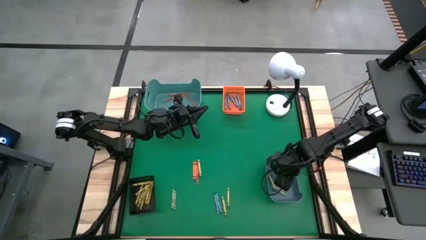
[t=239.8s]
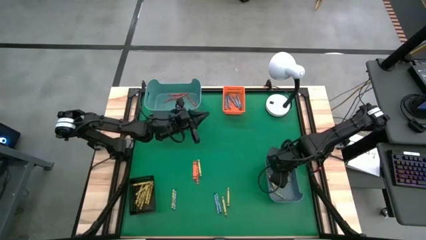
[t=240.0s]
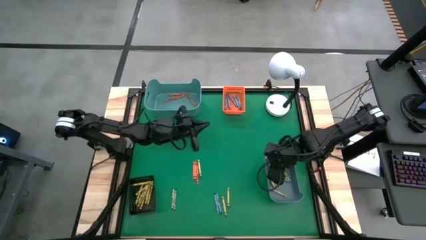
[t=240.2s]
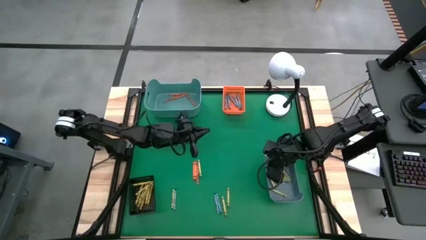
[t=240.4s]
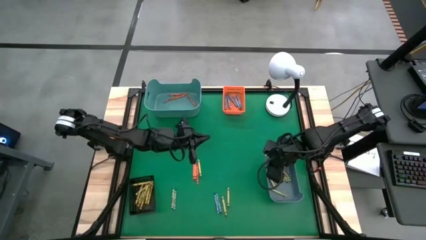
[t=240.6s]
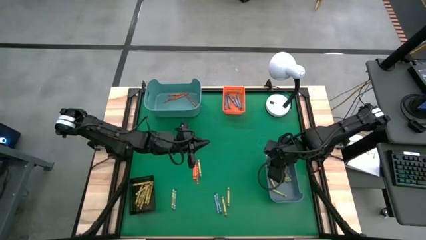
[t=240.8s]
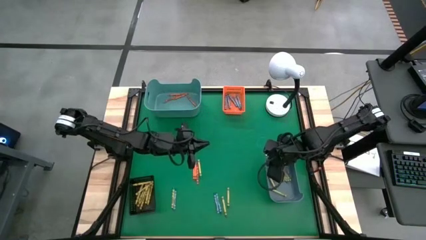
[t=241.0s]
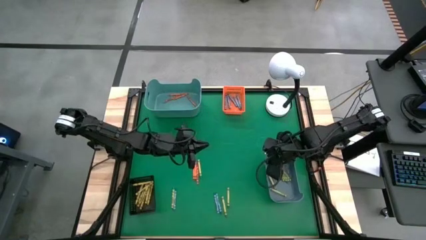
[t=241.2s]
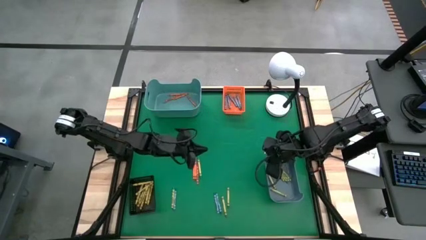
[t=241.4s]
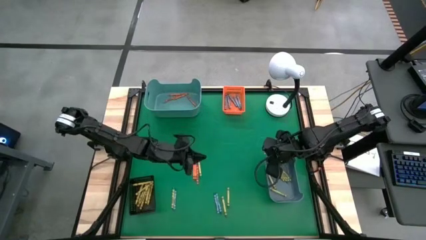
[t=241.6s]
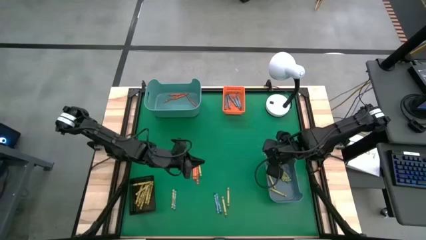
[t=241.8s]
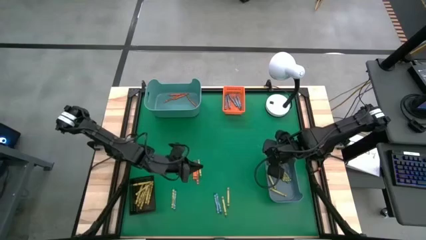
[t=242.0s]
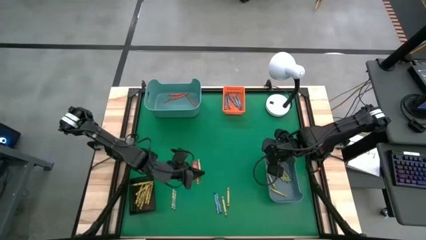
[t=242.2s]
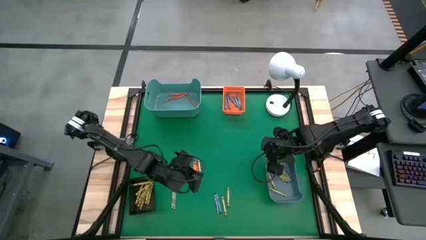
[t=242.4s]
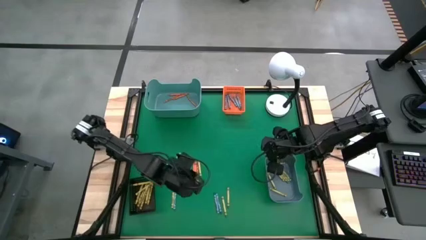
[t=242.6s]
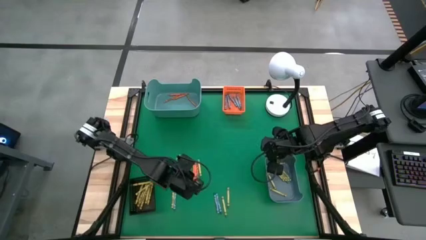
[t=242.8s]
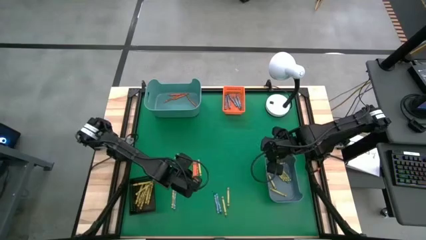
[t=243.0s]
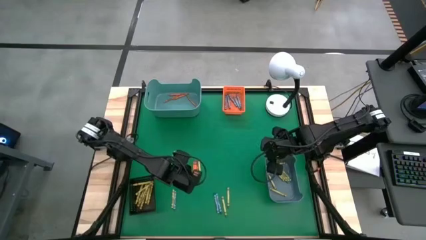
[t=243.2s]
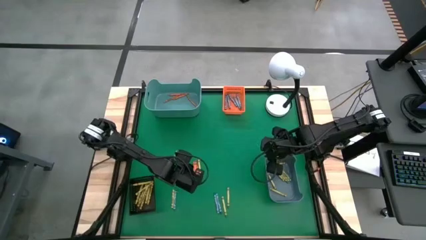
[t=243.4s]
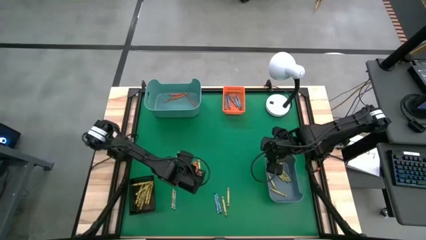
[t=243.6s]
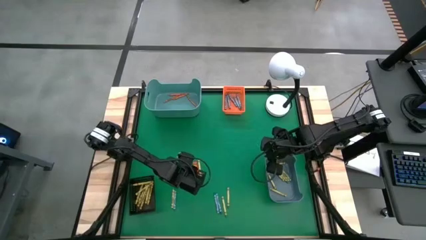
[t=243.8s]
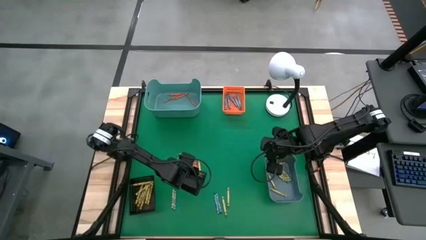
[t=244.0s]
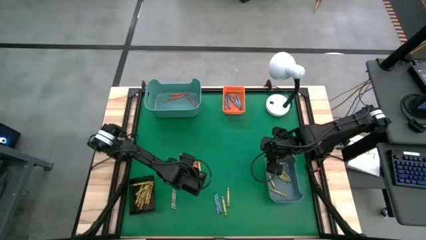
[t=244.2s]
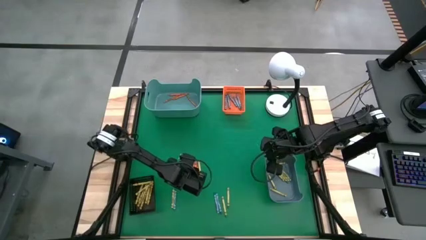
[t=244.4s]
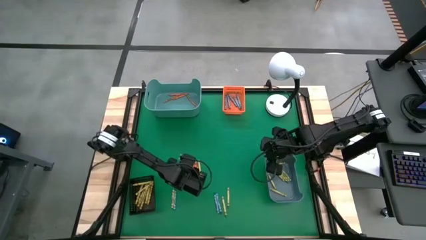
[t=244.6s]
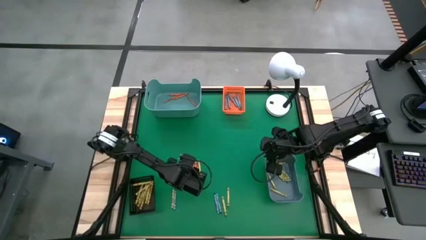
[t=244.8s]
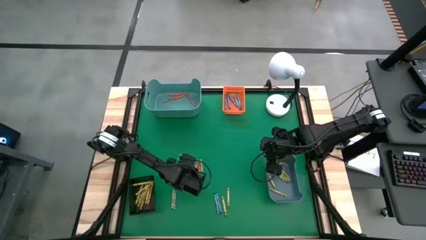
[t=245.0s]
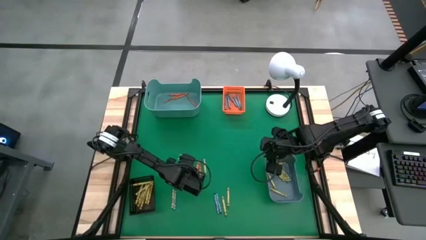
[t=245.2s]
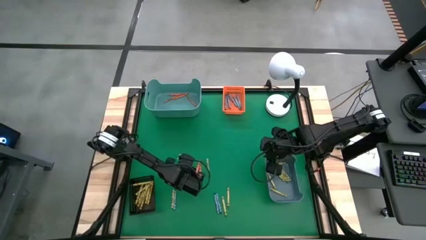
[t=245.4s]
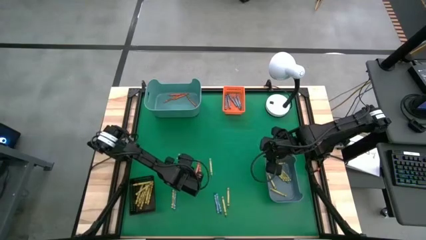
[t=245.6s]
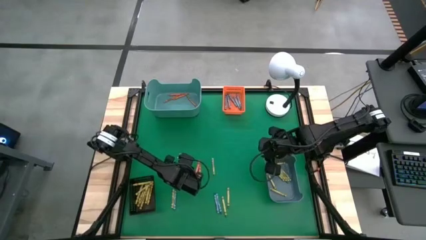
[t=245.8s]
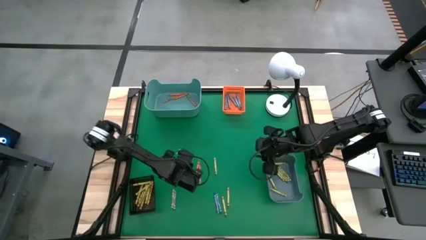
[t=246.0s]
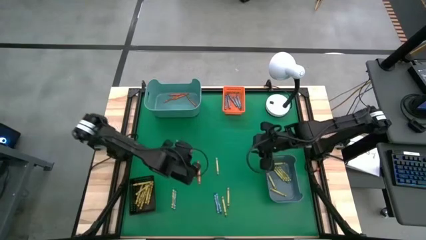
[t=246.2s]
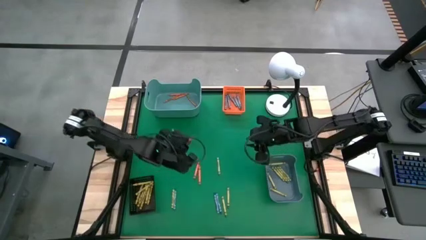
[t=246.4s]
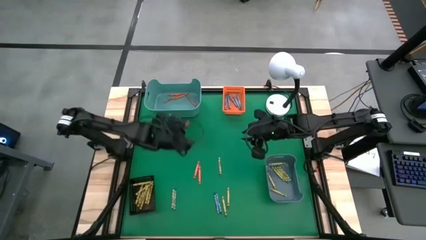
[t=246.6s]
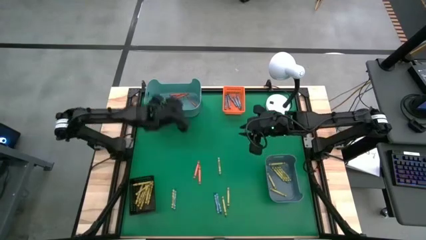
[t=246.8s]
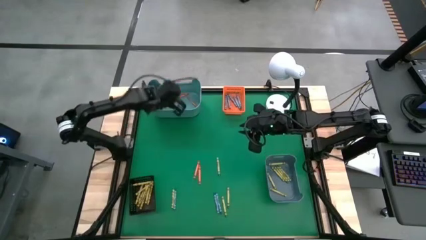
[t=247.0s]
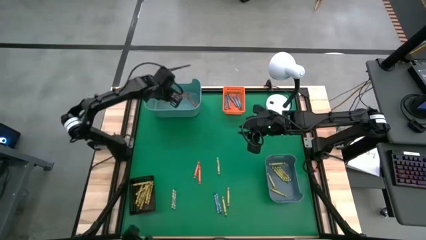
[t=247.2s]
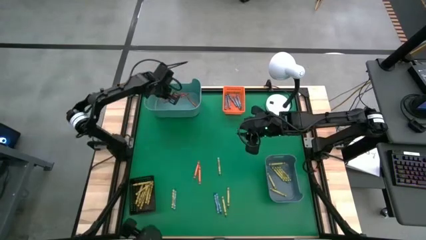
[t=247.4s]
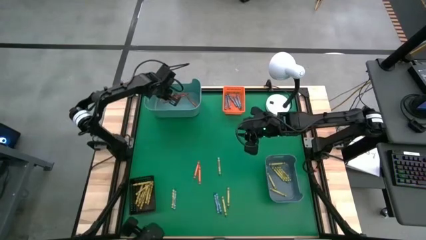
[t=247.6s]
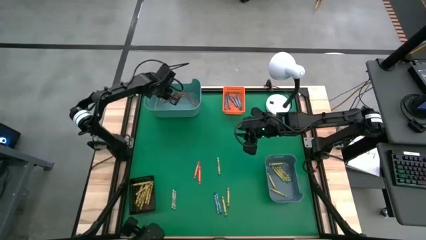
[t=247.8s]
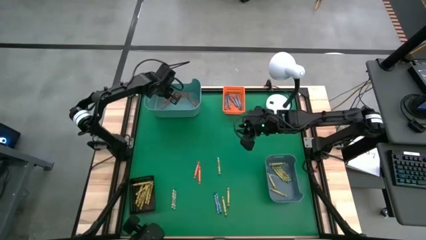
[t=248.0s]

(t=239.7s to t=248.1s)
Task: Sort crayons
Put the orange crayon into the green bin

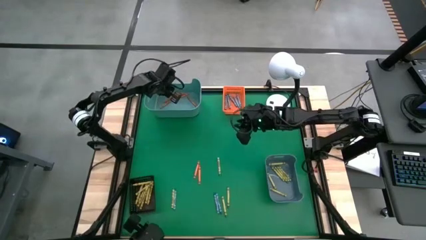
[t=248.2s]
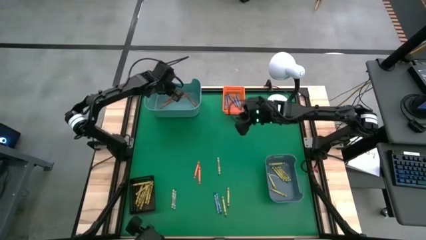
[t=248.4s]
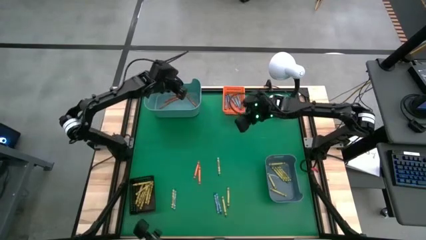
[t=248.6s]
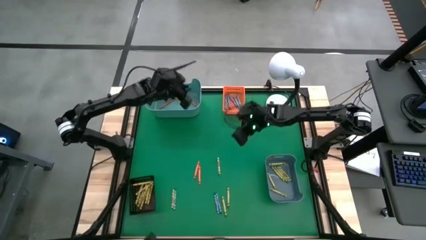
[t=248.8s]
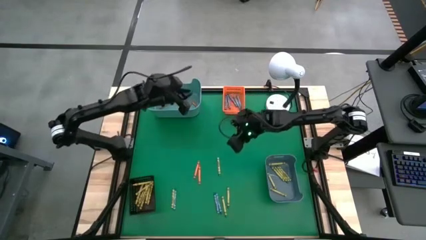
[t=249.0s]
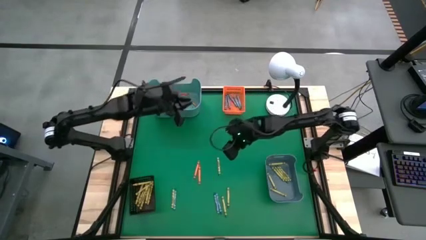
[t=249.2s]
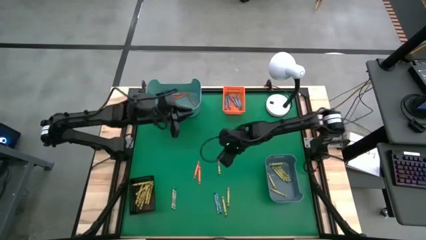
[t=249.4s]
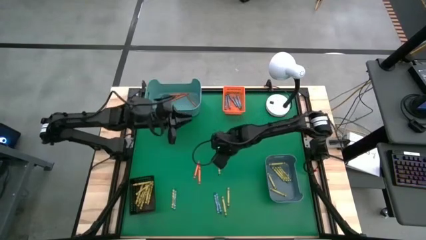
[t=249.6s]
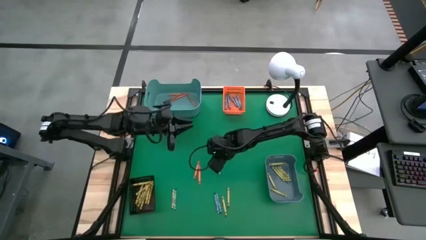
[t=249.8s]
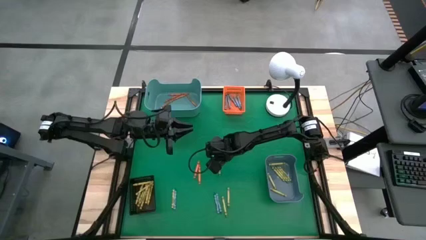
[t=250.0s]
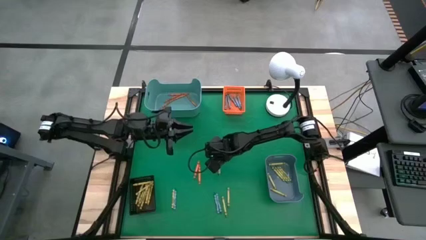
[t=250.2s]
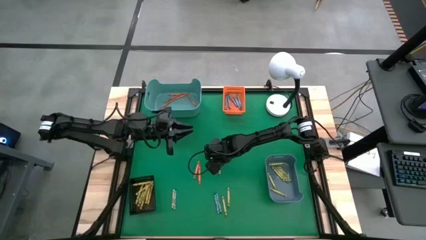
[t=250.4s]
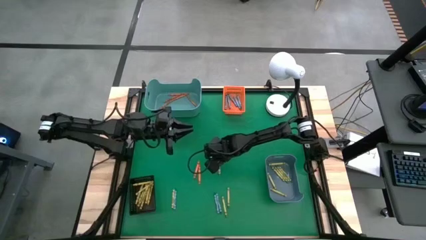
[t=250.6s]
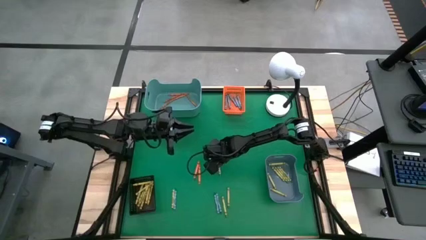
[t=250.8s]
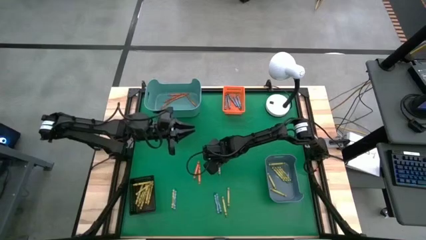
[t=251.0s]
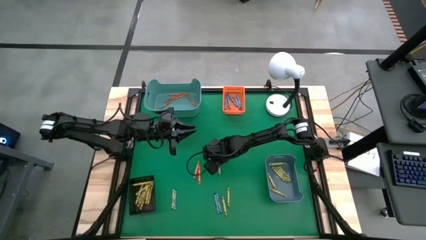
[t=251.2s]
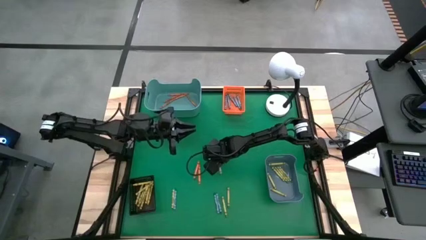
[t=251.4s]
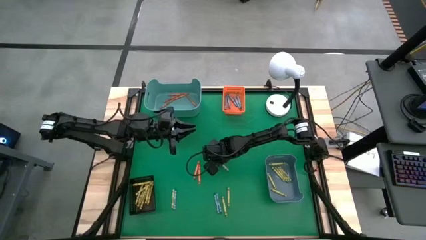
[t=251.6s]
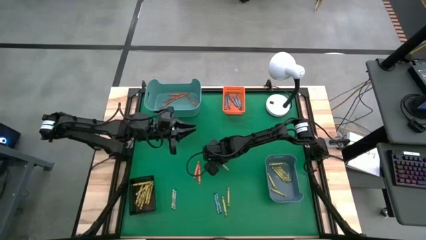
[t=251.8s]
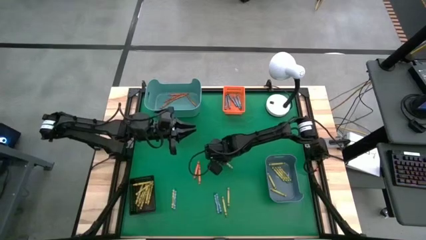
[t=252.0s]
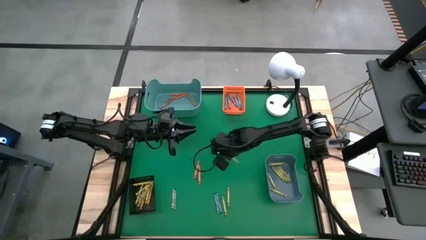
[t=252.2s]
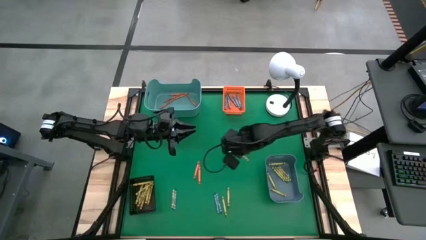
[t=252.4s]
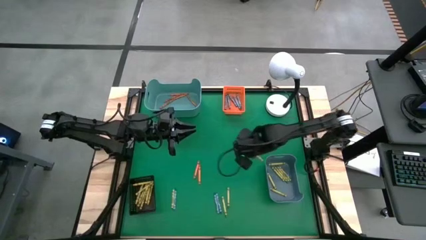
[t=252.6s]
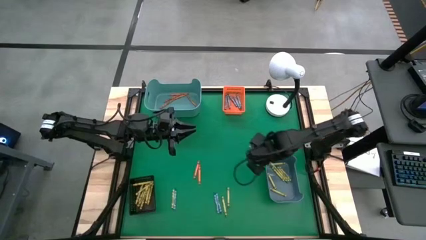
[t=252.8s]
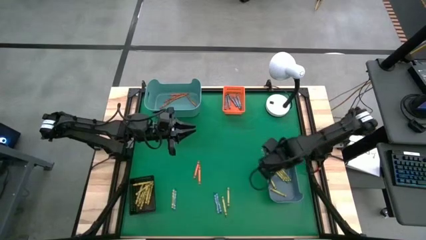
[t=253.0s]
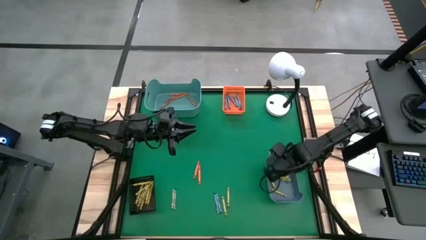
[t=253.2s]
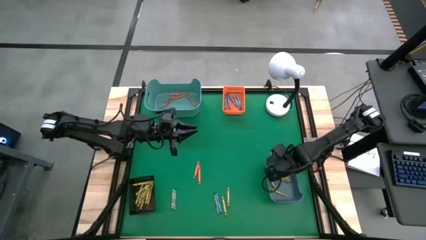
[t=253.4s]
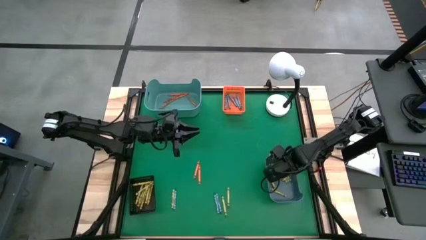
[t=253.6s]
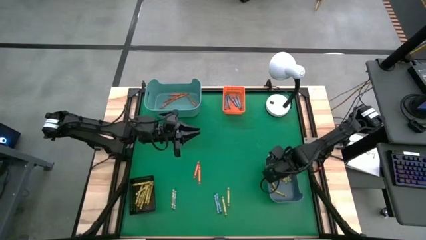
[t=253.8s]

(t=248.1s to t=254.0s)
Put the green crayon into the blue bin
